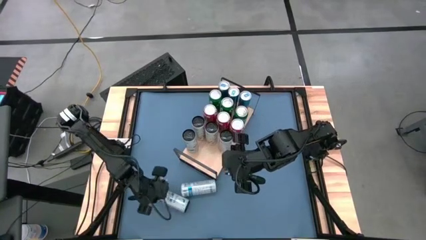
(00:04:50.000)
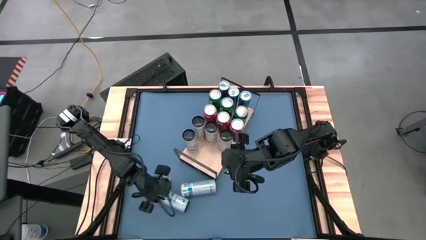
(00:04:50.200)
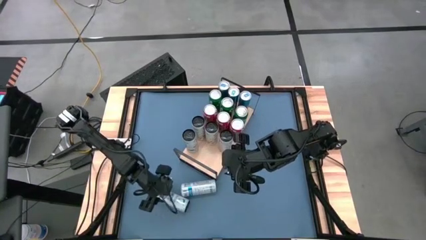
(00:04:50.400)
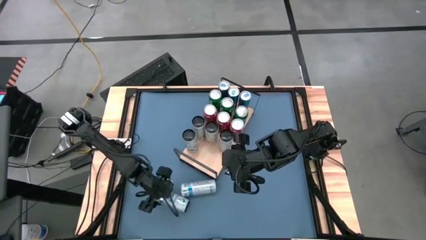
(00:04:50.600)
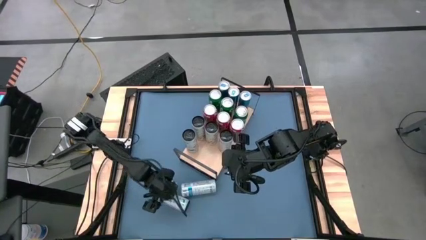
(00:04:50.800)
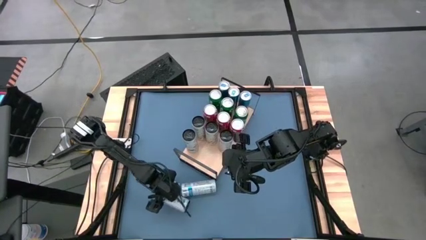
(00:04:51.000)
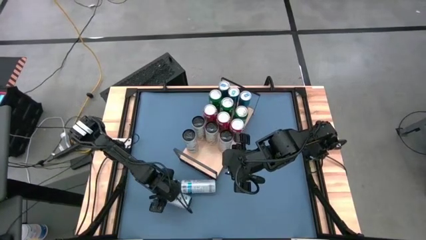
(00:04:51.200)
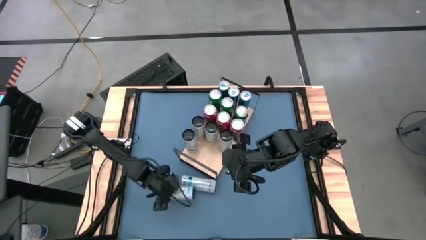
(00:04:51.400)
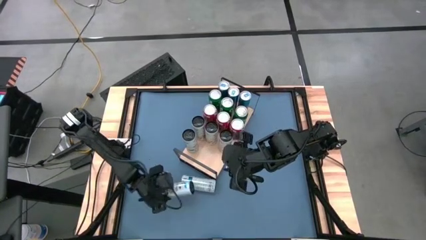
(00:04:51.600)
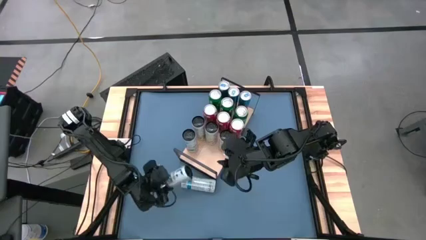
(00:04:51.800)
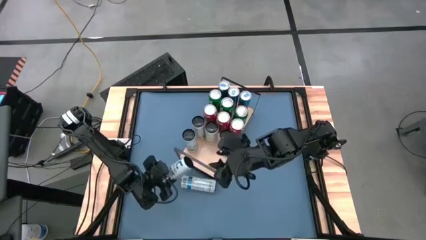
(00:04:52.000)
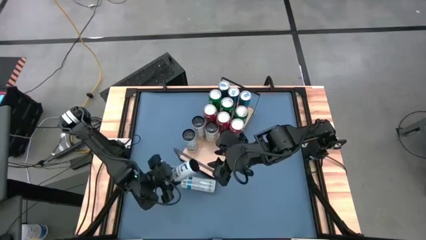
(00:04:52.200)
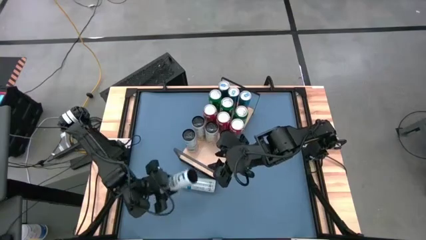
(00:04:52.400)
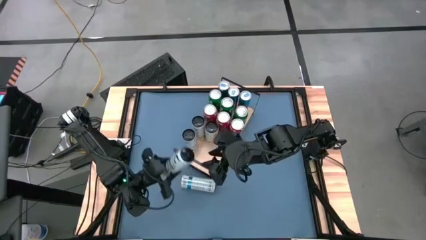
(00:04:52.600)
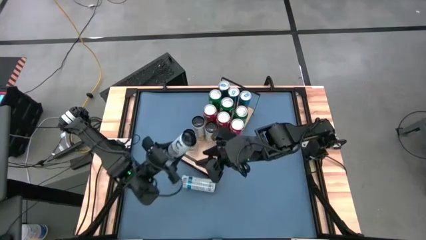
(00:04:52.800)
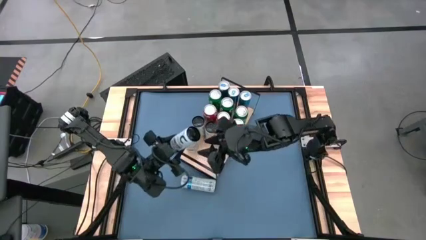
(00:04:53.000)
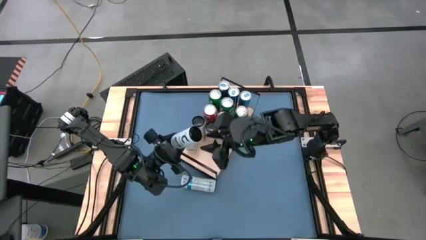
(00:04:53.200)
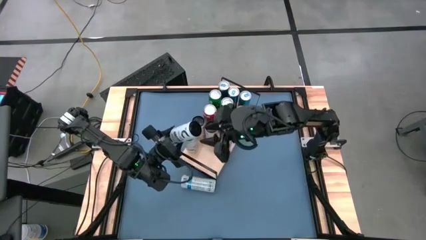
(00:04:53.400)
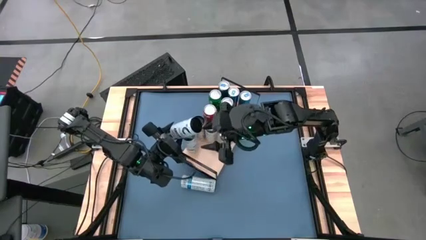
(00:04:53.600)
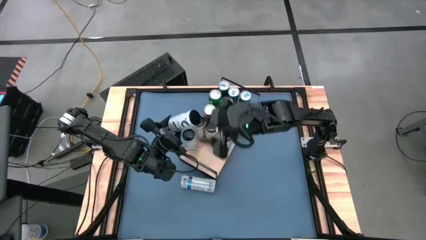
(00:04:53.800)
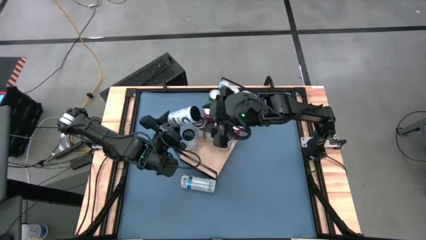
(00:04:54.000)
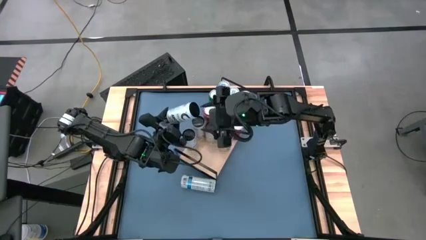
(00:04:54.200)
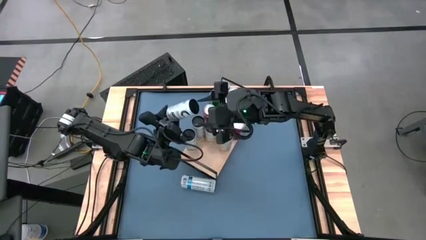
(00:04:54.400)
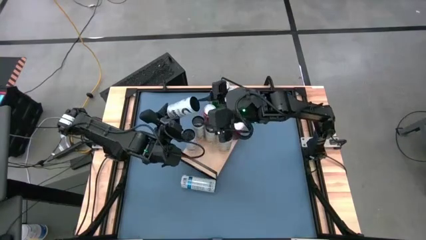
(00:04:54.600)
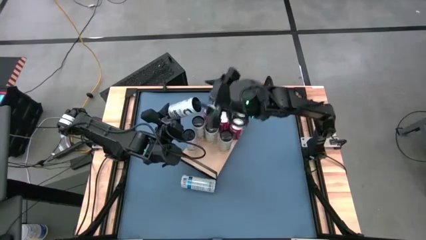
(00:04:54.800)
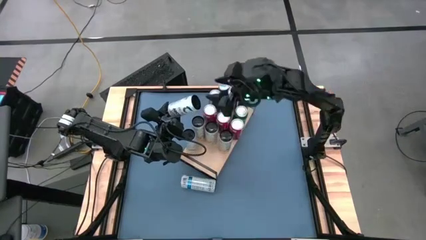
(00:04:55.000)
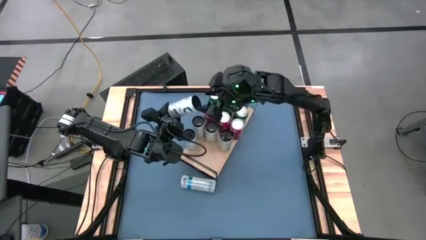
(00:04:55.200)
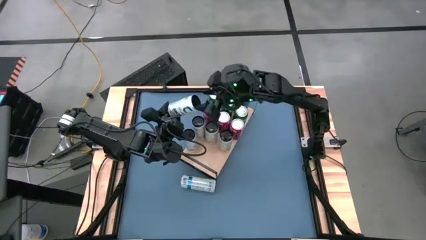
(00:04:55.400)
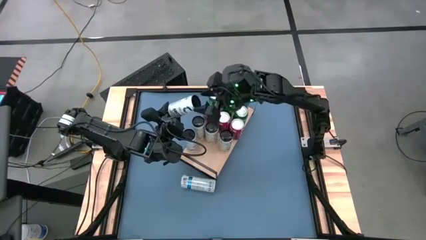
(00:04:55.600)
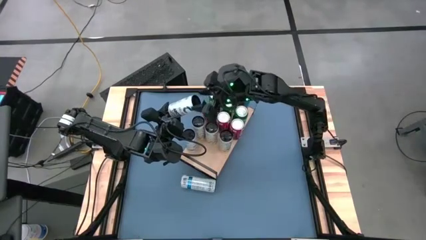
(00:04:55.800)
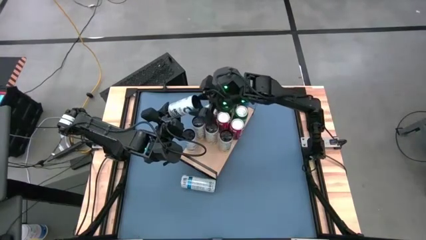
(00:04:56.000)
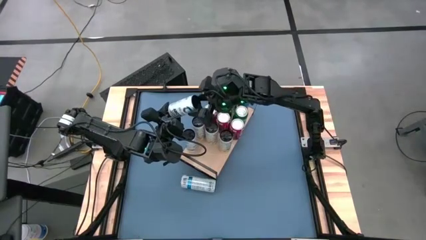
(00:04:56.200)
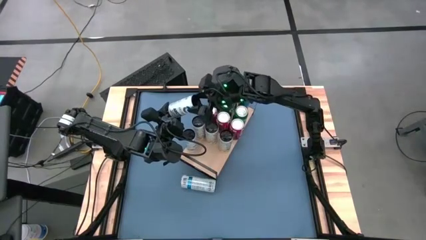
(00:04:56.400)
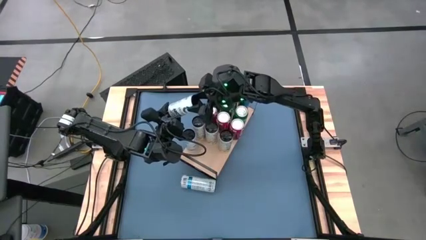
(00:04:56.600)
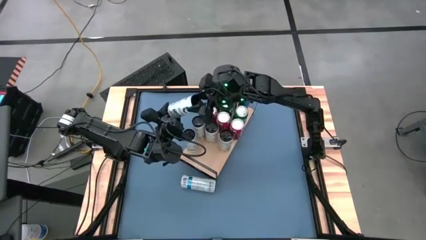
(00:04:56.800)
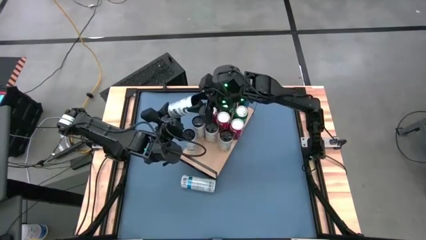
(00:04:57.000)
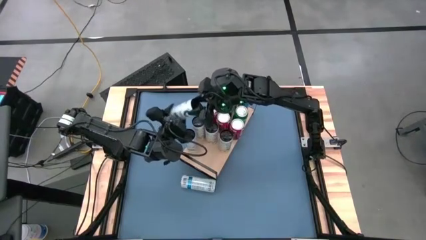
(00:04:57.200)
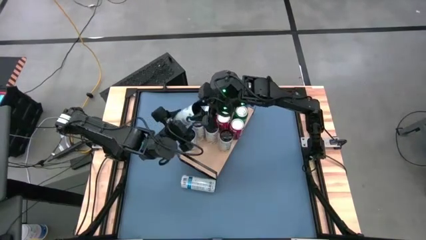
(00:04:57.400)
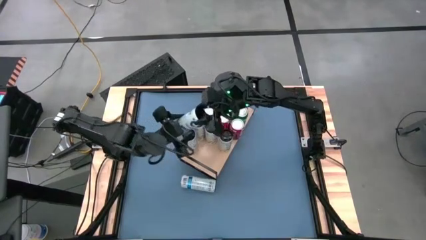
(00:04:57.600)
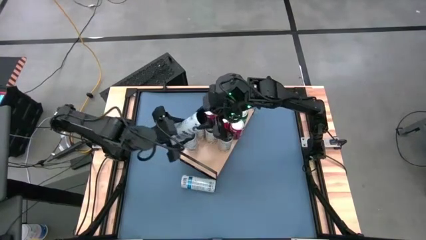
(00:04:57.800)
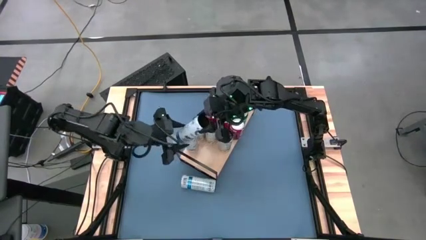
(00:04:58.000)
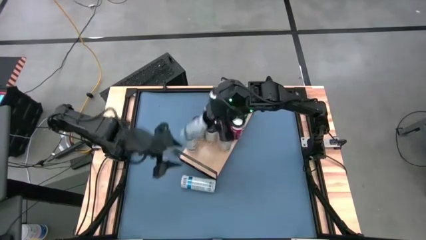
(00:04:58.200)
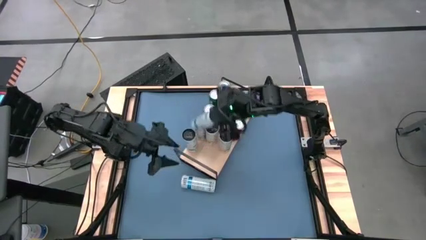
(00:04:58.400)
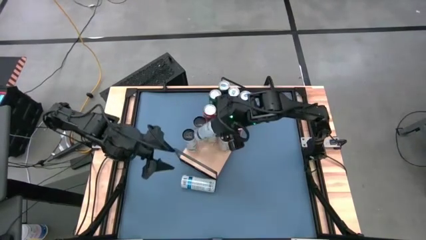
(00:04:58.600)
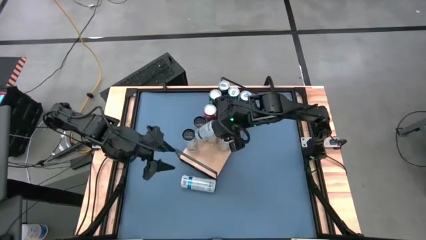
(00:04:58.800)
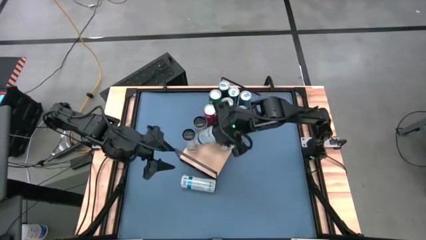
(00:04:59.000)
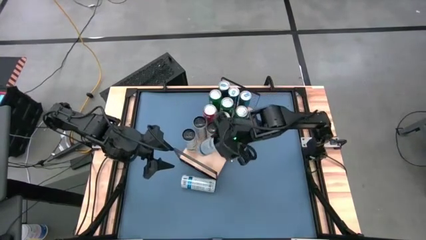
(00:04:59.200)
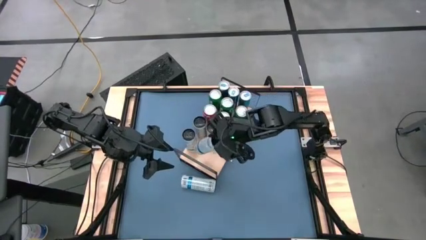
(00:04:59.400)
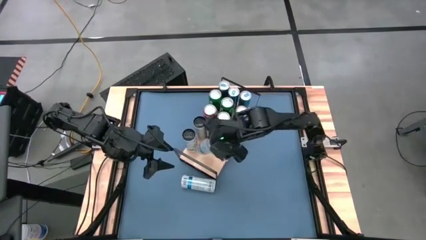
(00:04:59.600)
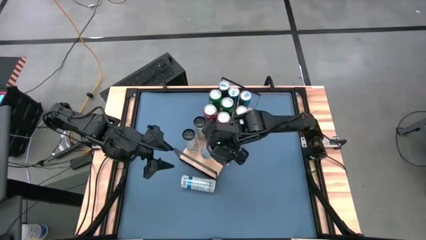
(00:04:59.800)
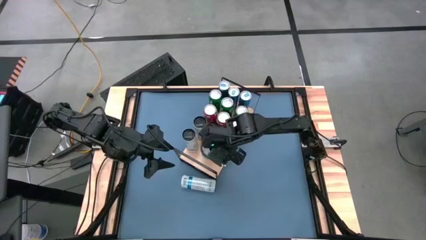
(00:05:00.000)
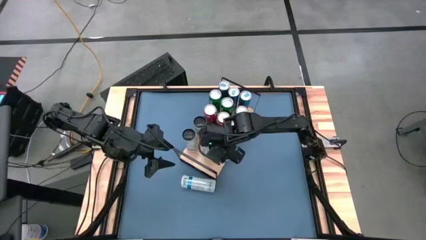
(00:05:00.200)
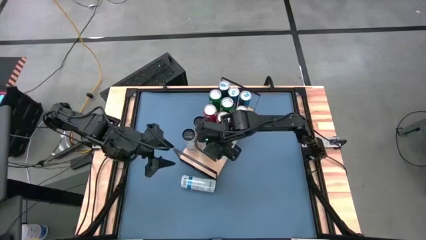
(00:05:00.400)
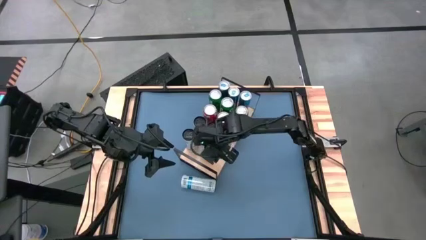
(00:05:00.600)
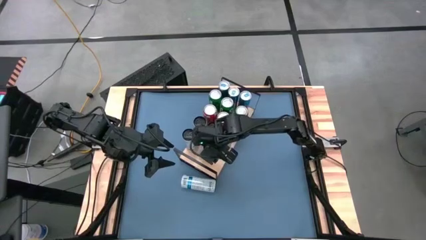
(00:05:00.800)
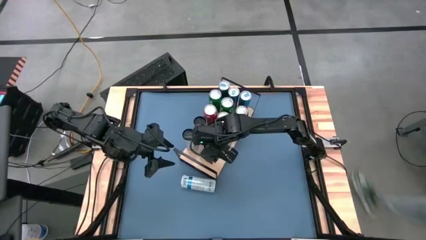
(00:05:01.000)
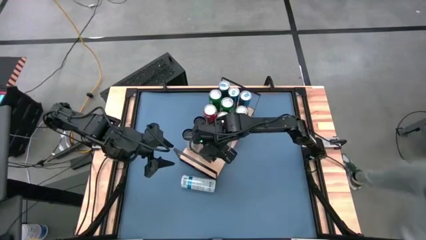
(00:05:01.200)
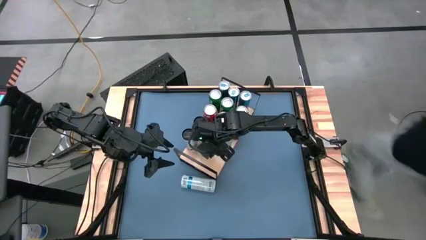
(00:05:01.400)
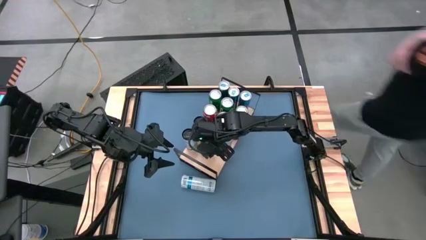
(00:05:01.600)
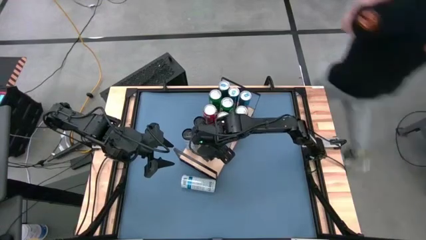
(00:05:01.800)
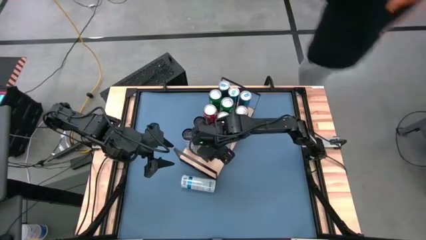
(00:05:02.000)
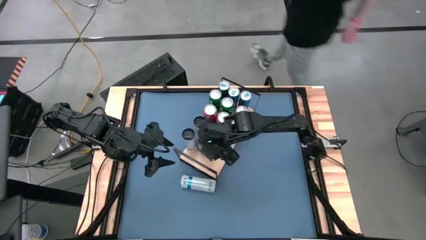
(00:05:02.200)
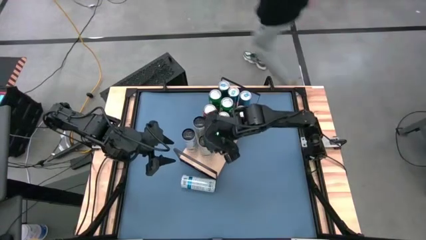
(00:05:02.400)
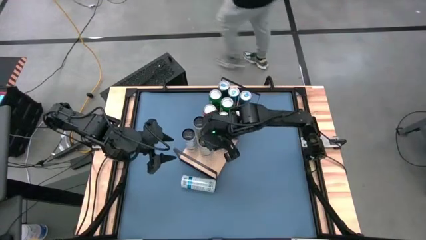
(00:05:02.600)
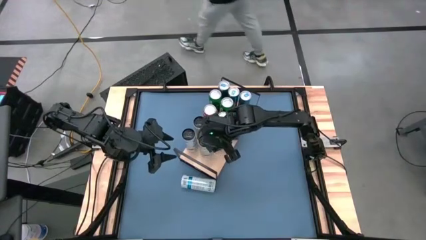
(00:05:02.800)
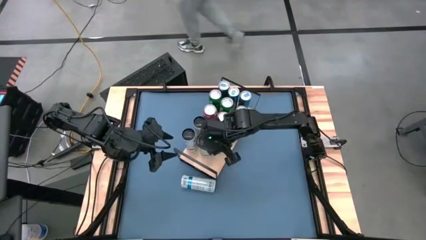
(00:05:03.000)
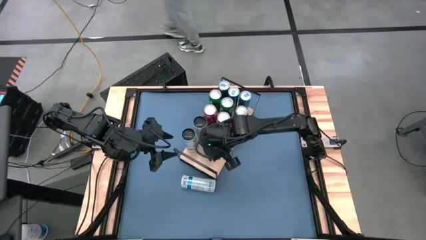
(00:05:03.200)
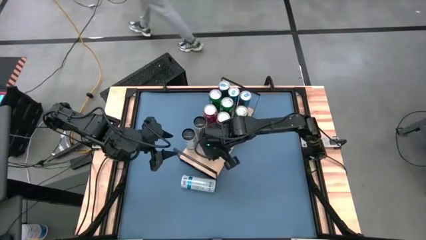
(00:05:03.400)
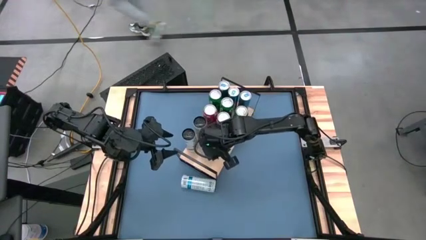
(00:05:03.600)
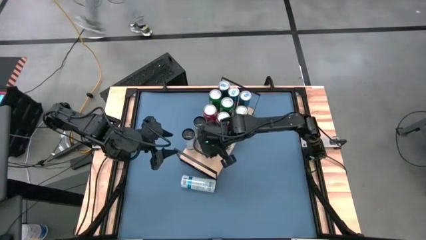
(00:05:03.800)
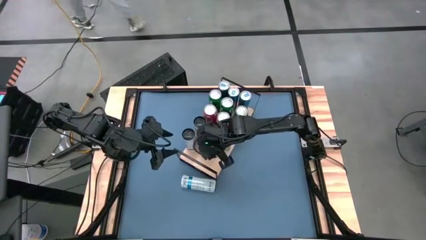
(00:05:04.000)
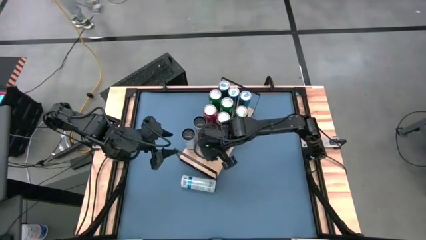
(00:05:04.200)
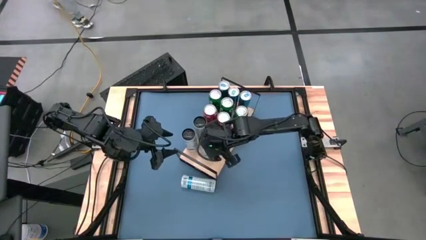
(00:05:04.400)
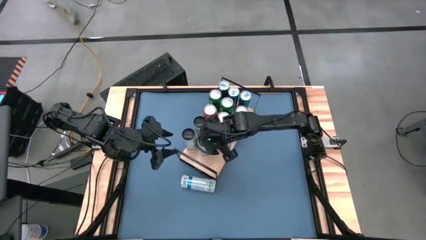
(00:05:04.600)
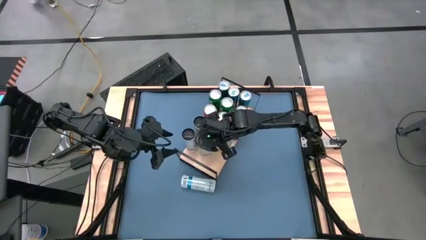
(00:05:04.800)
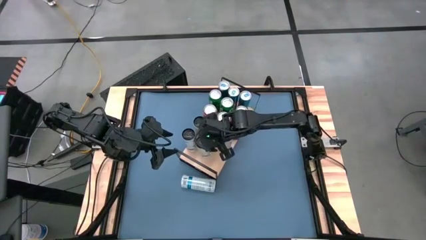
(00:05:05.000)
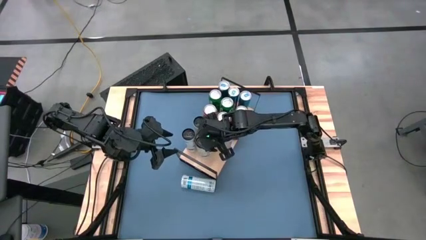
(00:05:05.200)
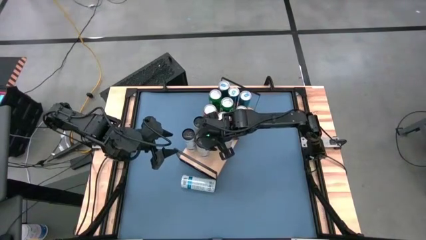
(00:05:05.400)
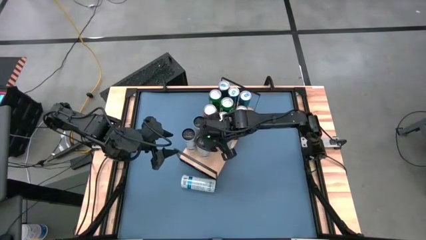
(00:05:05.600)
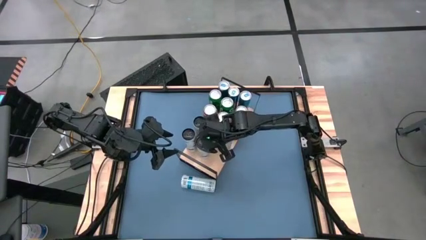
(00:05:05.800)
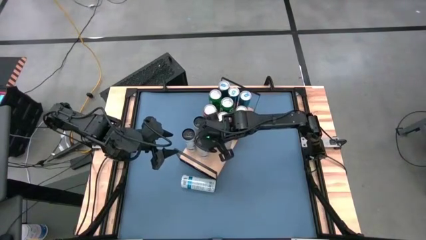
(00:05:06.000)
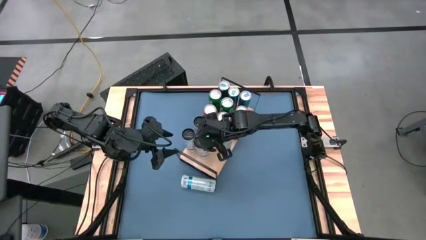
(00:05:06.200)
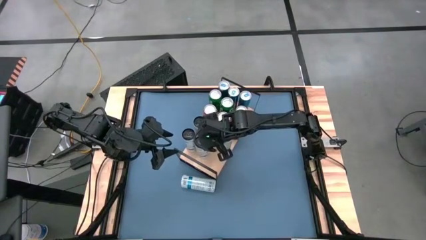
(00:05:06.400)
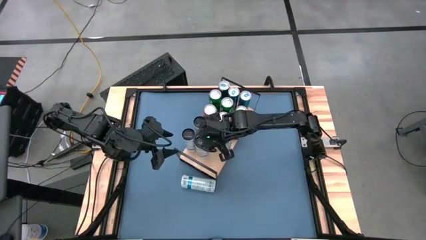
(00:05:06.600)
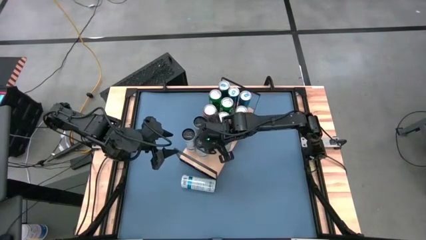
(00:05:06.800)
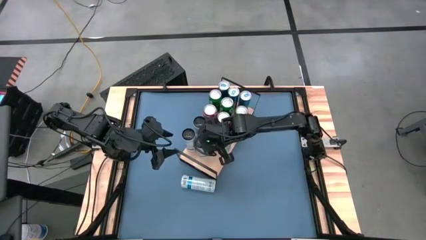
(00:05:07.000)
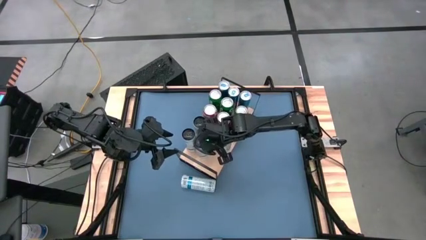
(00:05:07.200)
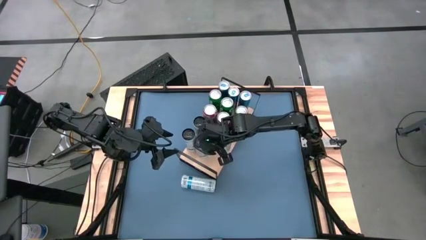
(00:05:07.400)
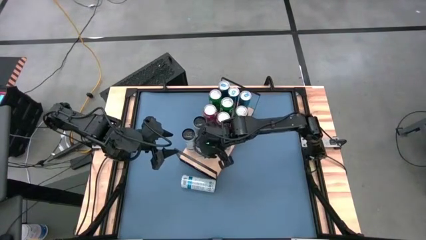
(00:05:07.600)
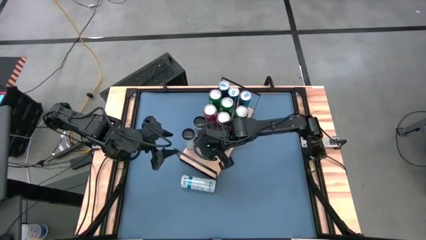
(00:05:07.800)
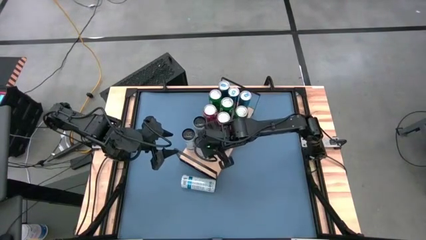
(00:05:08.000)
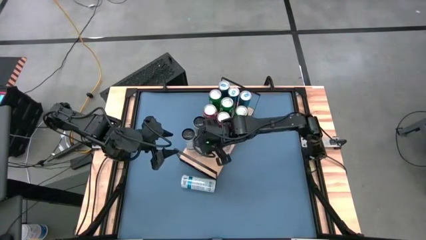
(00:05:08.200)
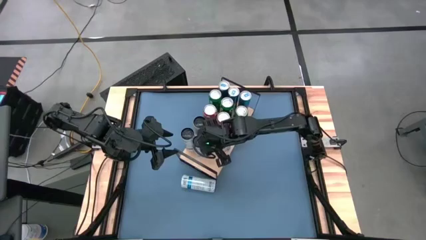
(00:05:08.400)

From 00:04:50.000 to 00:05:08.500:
Task: Place canned beverage on shelf
Put left white blue soda can on the shelf aligned with the other white blue soda can
